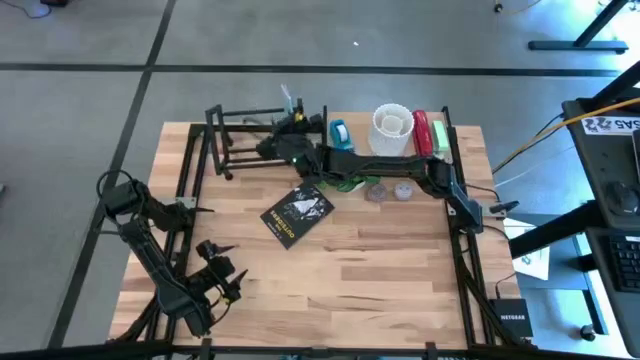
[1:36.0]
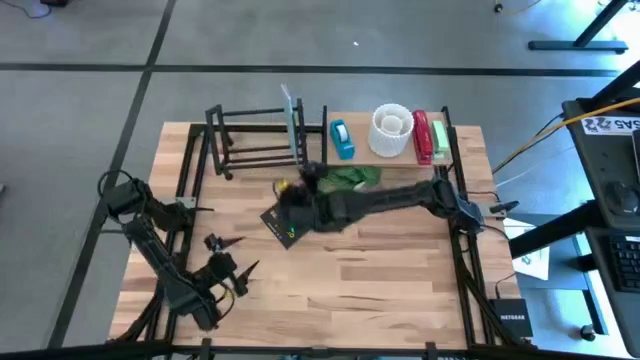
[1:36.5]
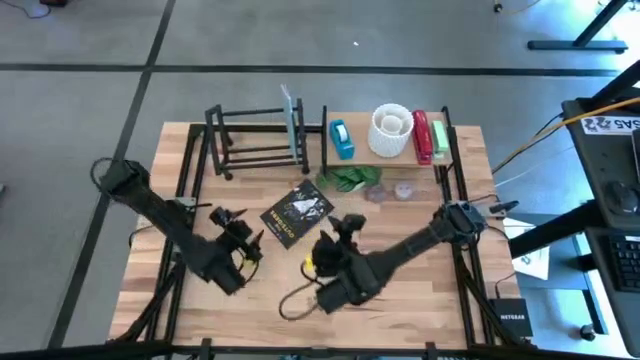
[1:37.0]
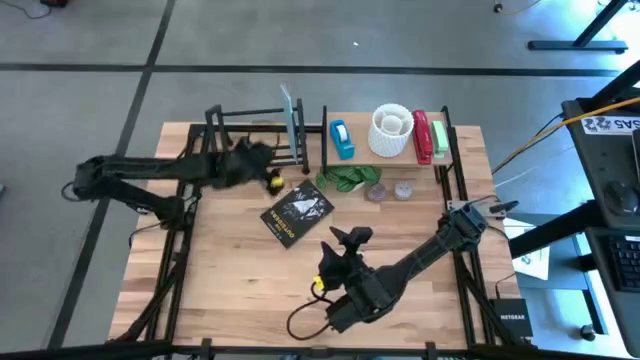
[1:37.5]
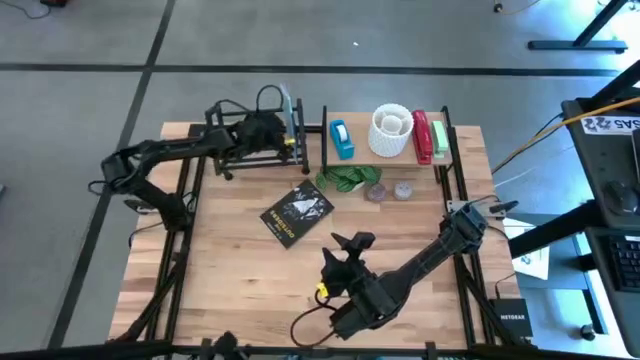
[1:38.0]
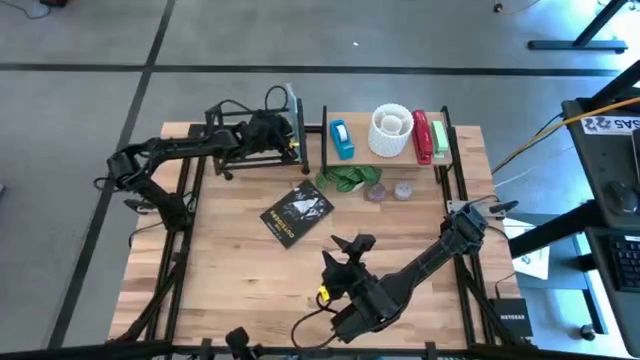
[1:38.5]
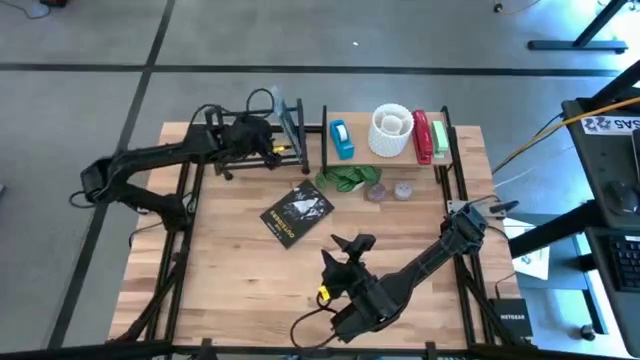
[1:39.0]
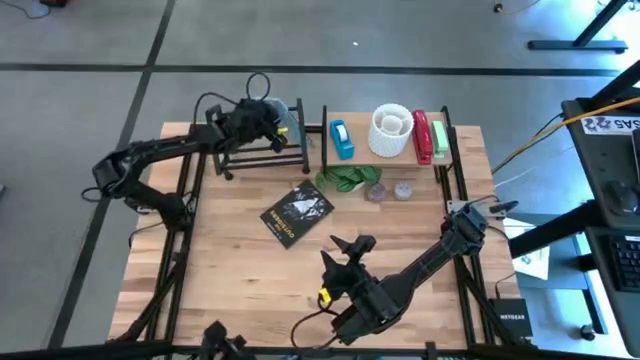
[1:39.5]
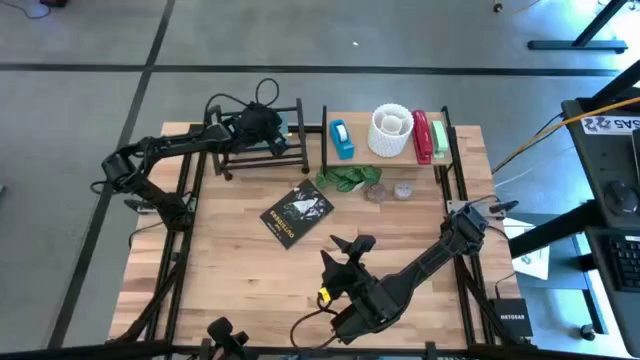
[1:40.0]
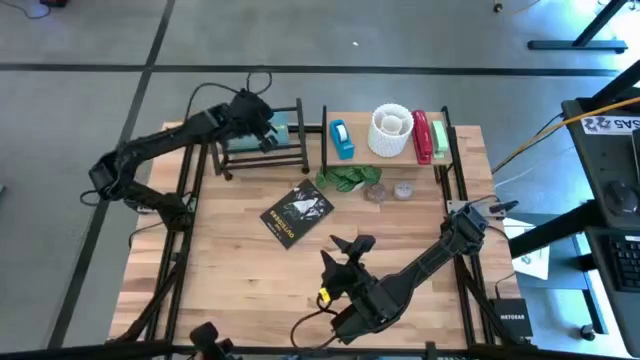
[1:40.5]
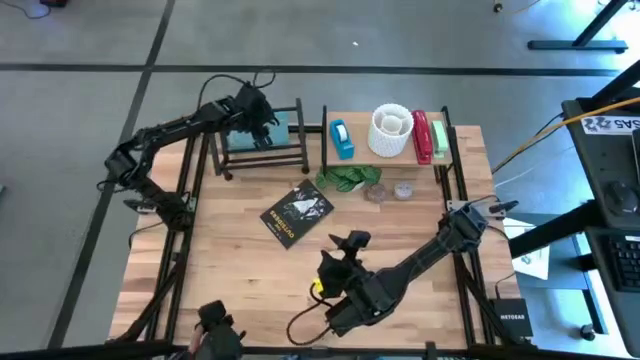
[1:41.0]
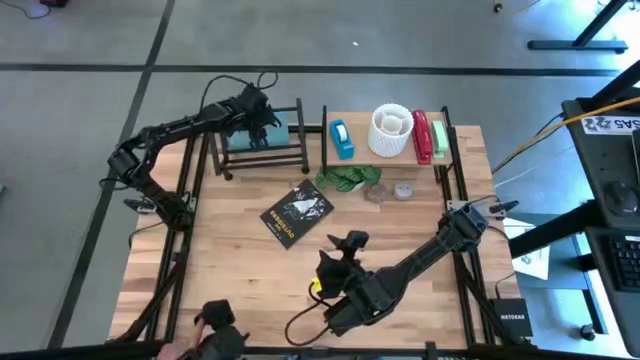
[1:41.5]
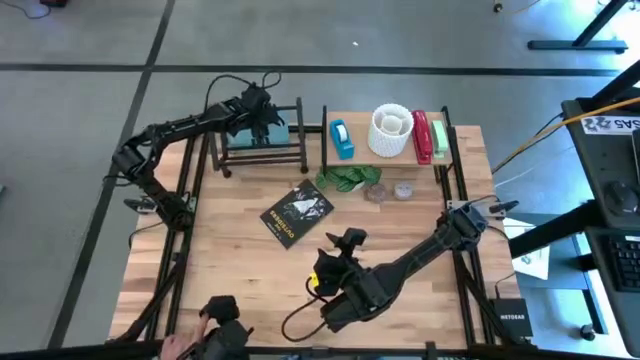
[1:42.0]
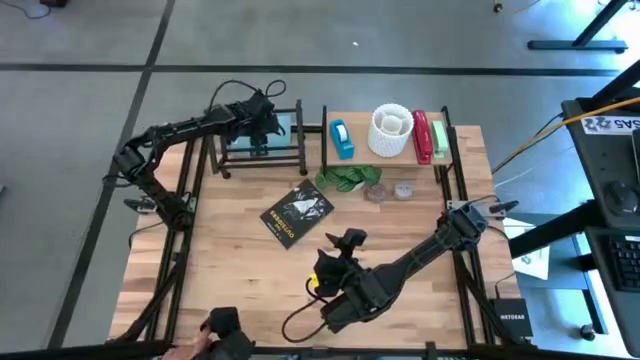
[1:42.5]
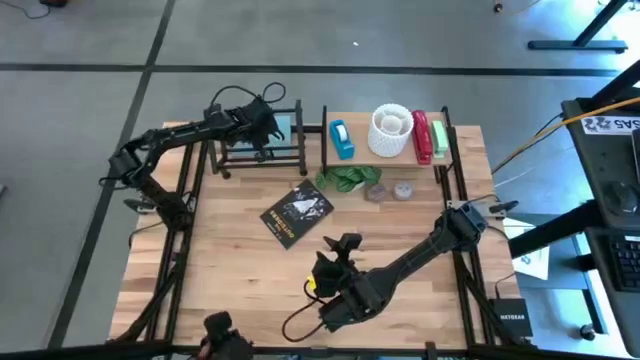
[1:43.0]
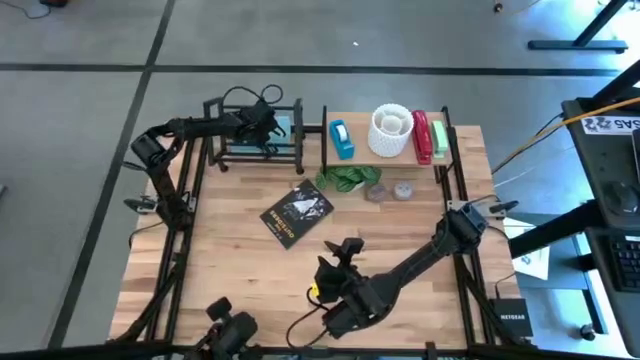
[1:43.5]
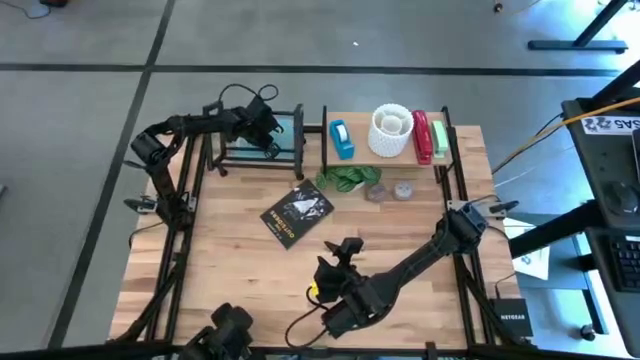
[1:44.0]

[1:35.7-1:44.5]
Task: Stock shelves
Adjust the blue book on the bookshelf

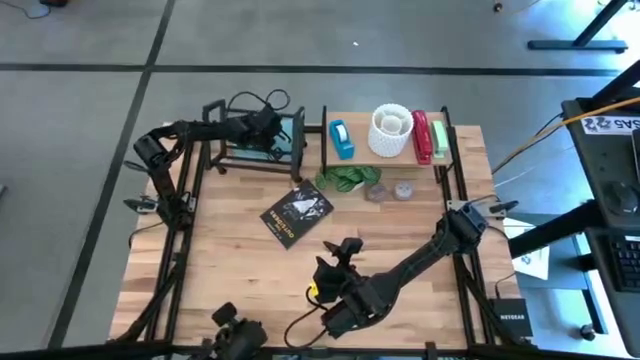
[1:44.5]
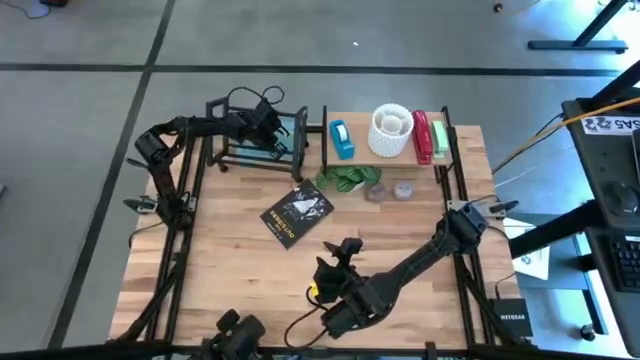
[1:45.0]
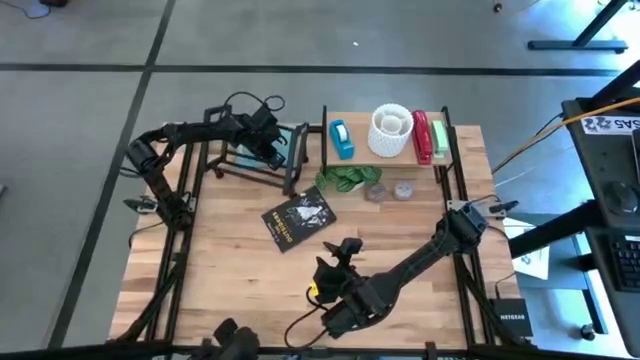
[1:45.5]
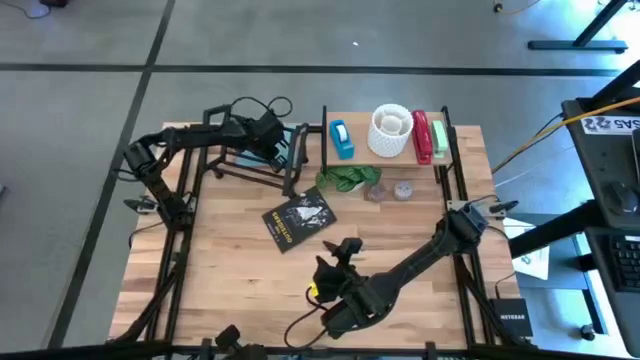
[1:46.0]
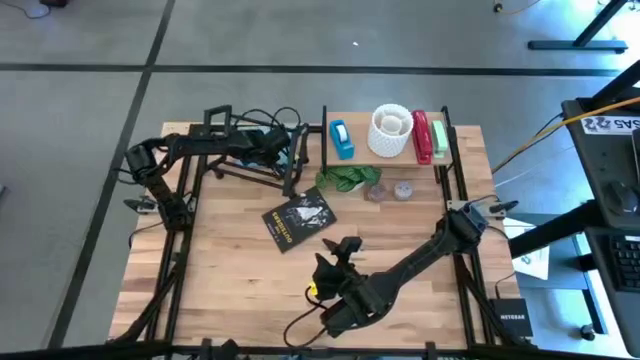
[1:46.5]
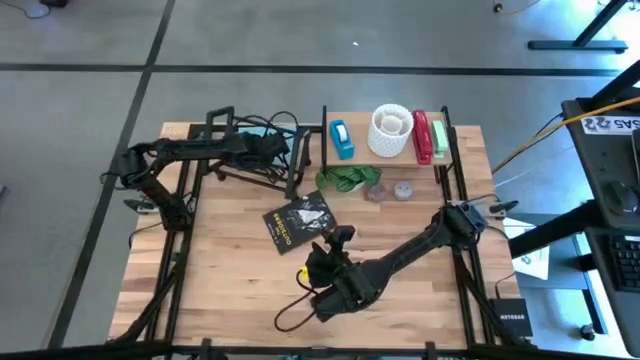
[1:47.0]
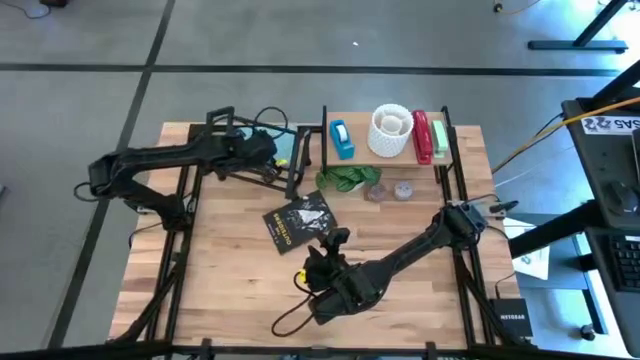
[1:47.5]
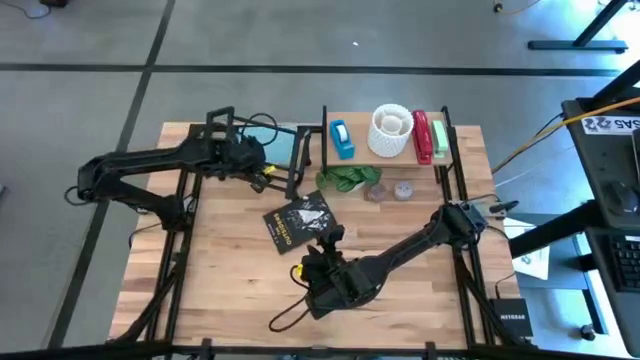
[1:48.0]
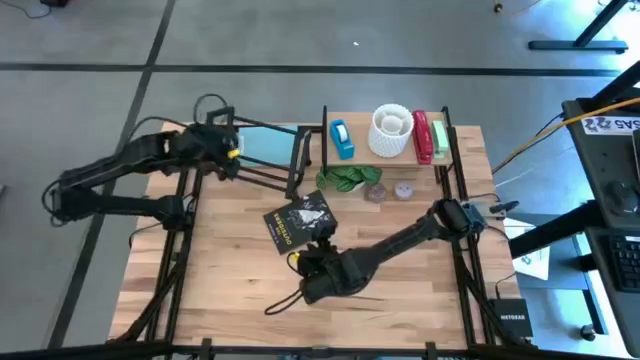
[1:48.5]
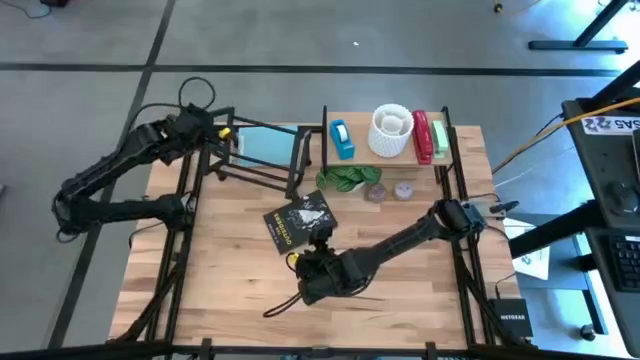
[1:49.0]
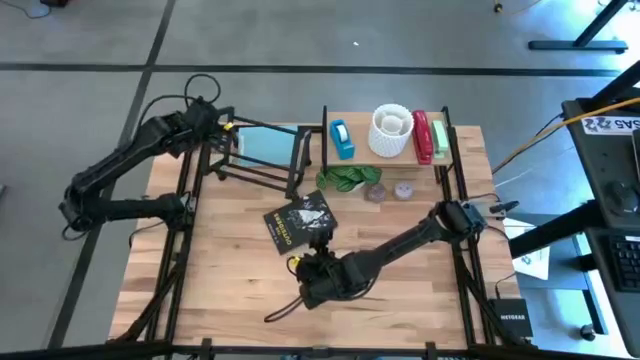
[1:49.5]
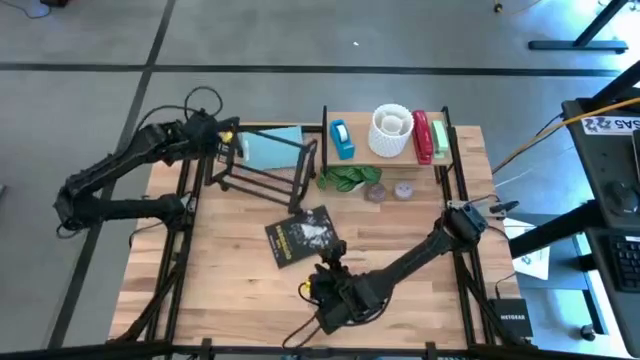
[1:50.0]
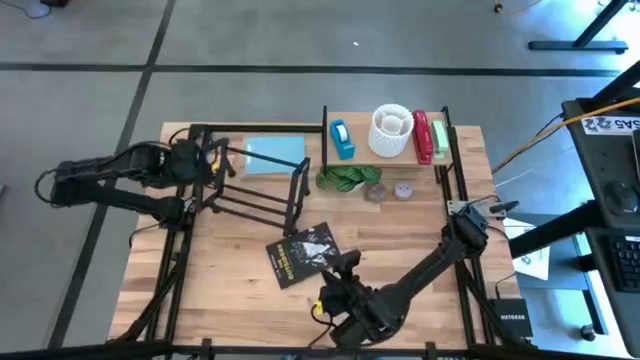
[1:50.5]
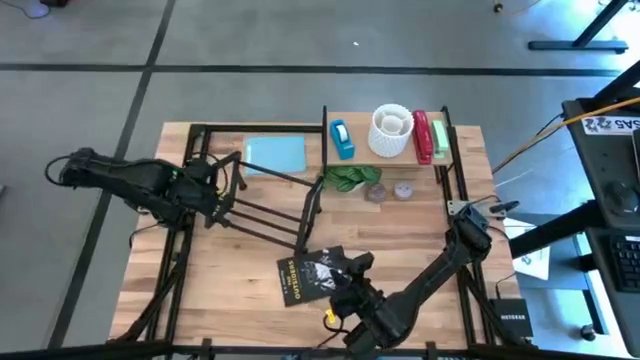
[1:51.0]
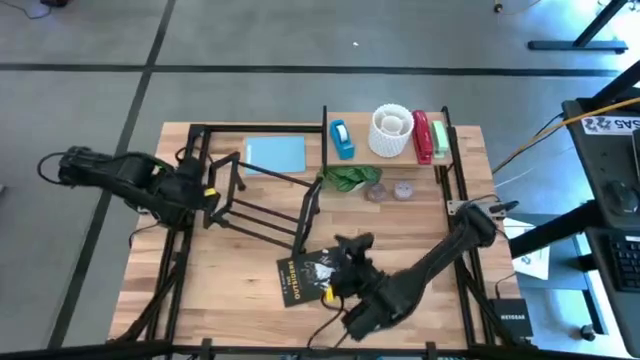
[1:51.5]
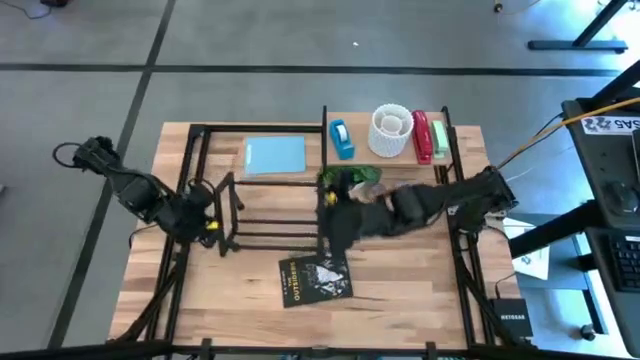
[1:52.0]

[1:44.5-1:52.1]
Move the bookshelf to the middle left of the table

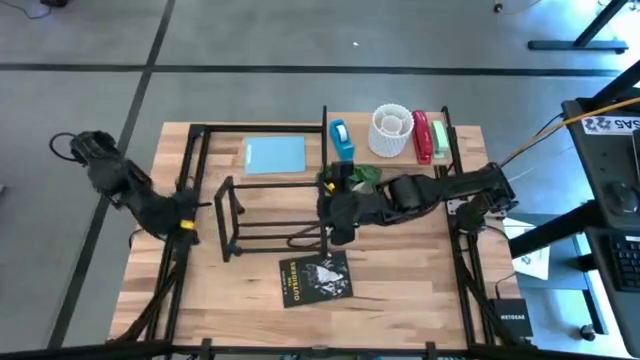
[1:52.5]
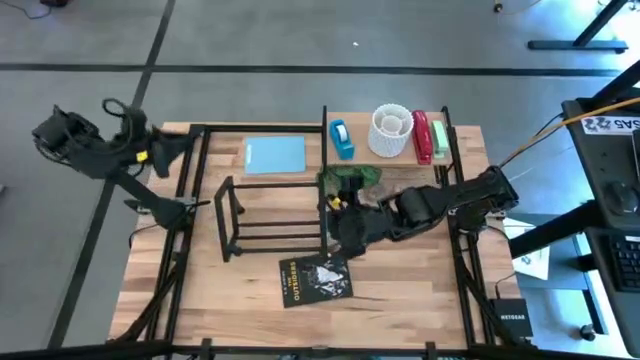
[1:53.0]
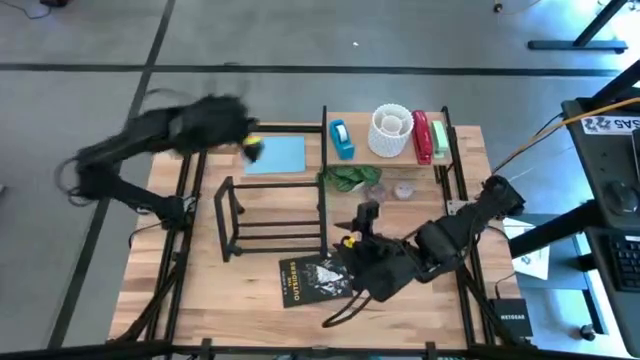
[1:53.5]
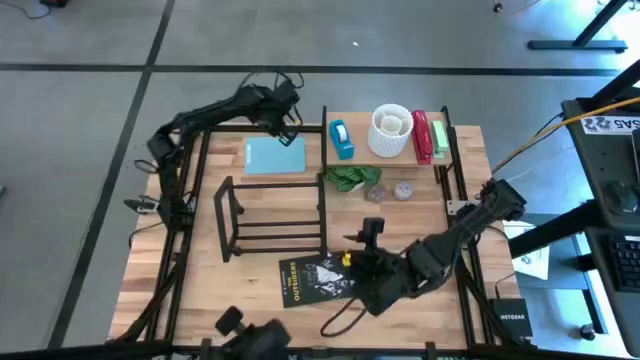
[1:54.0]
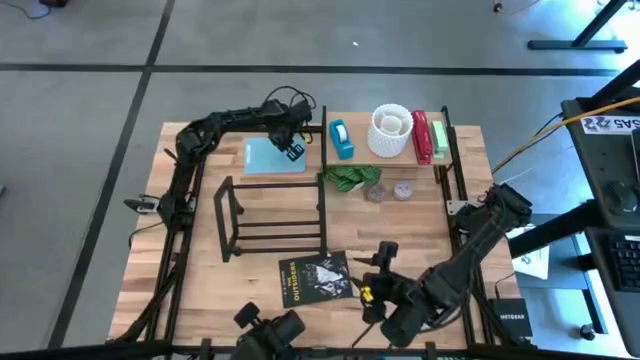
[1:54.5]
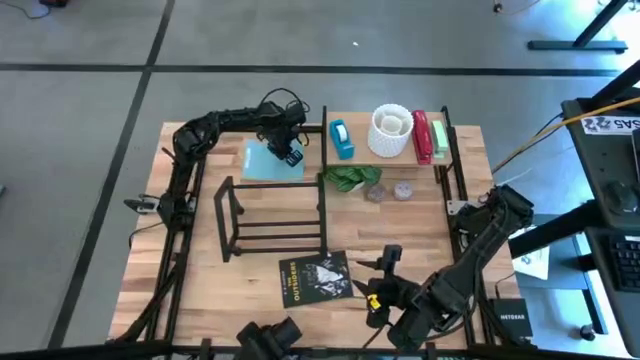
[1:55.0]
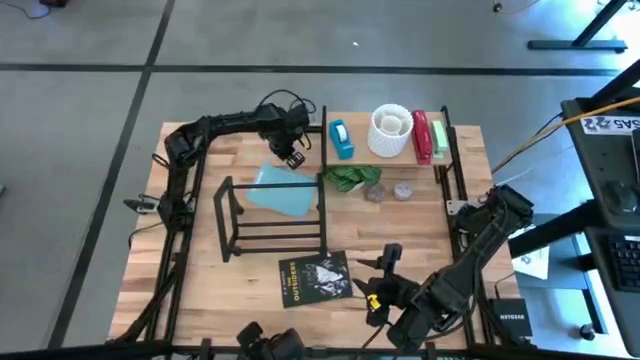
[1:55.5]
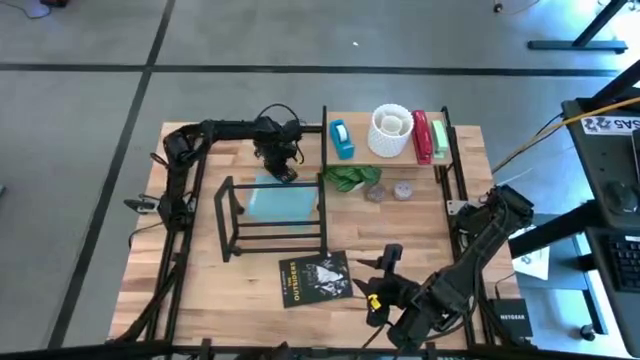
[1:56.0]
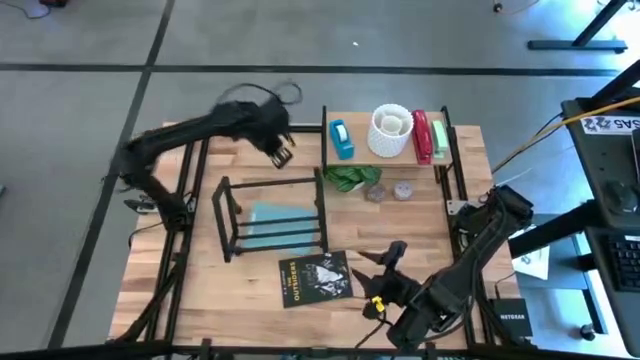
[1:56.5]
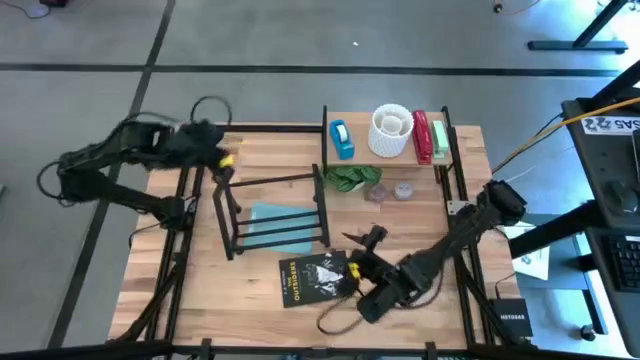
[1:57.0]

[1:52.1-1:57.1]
Move the blue book from the top left to the middle left of the table
